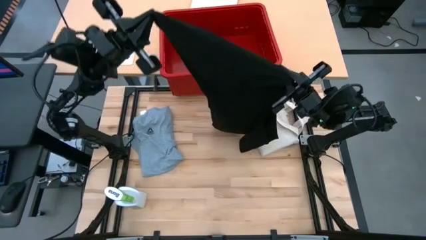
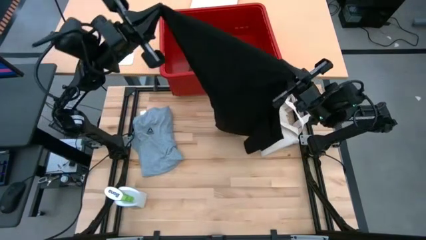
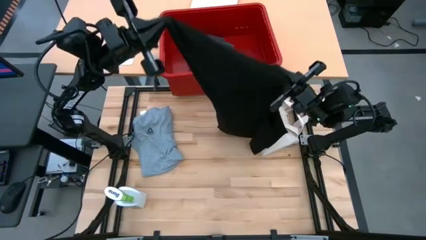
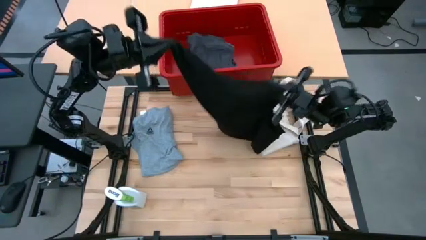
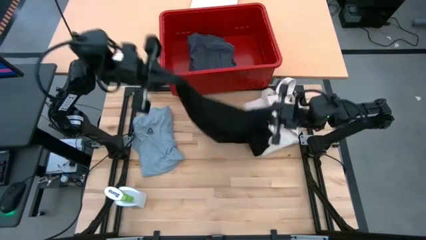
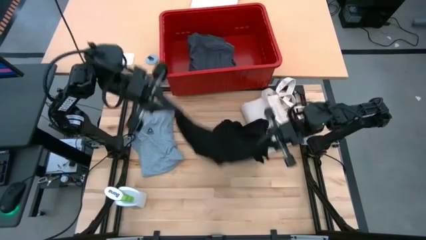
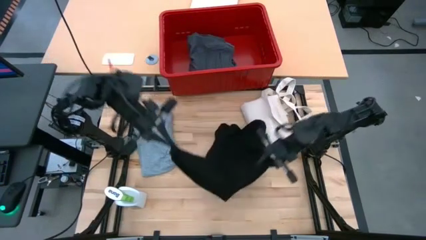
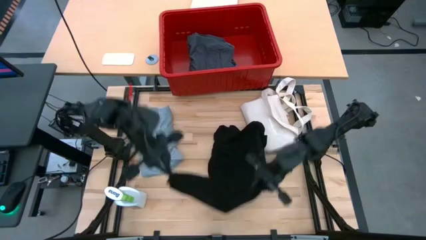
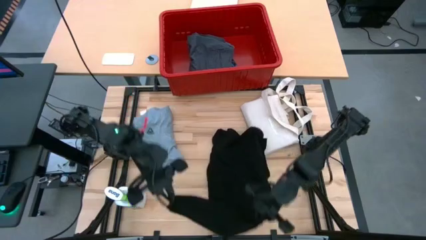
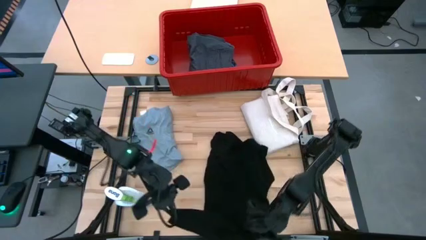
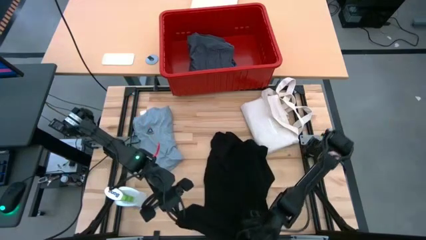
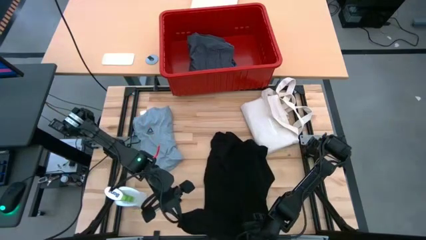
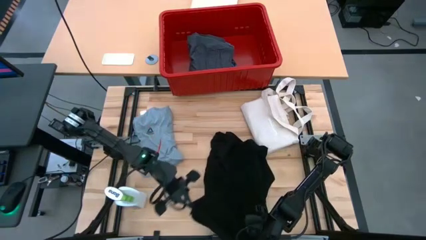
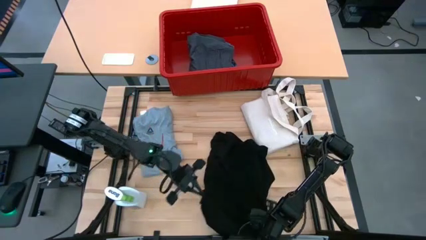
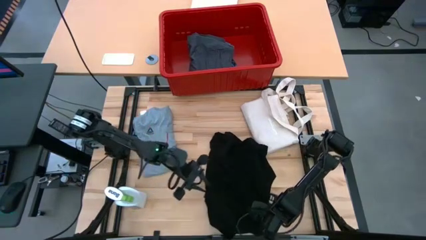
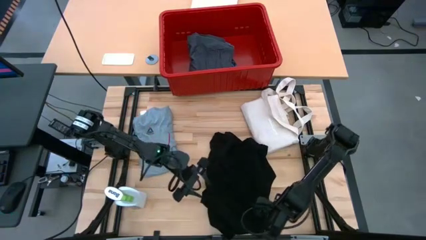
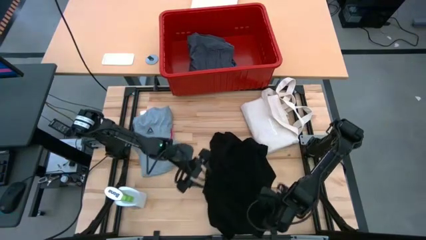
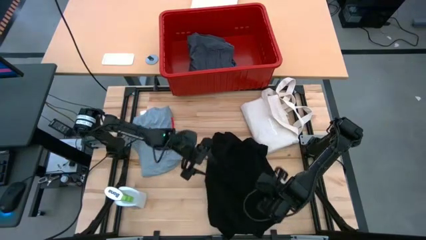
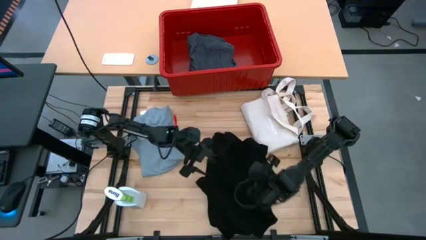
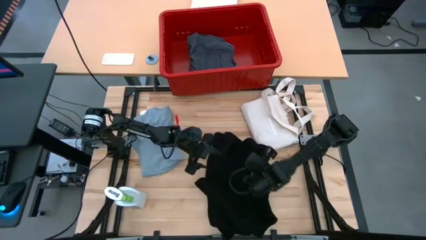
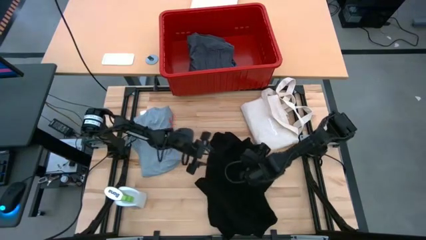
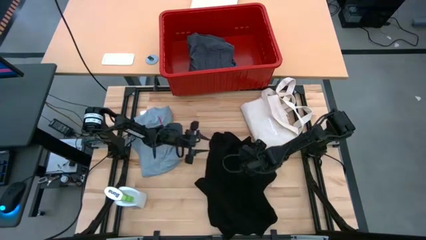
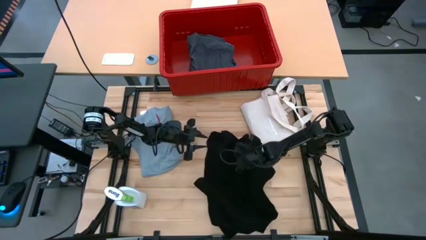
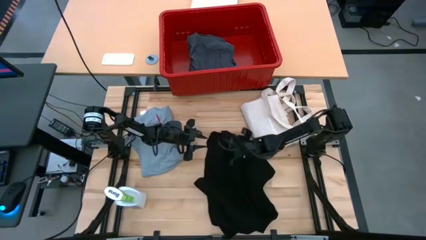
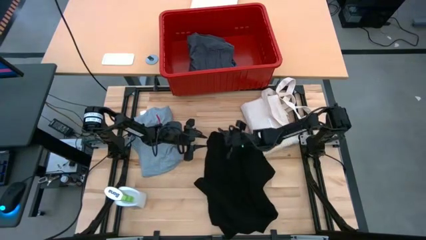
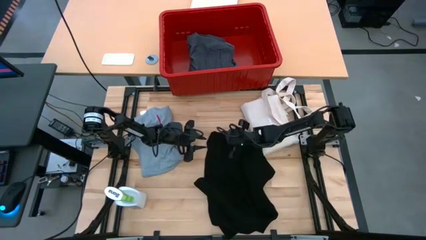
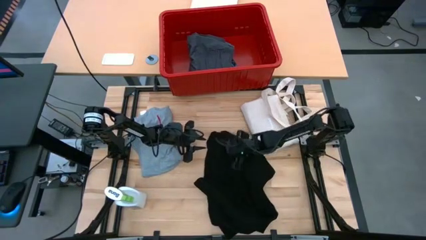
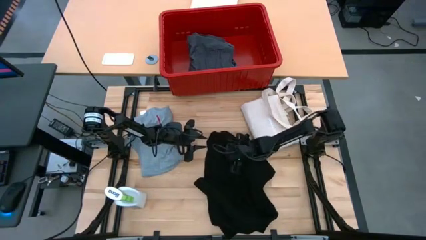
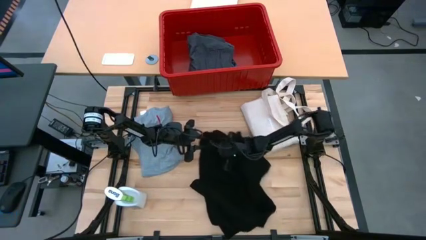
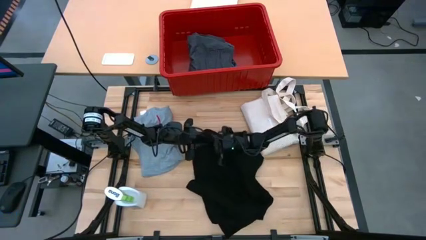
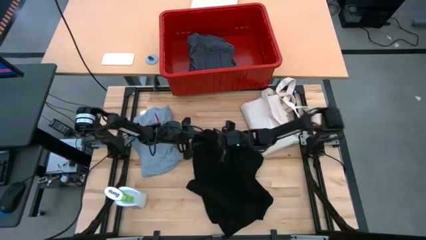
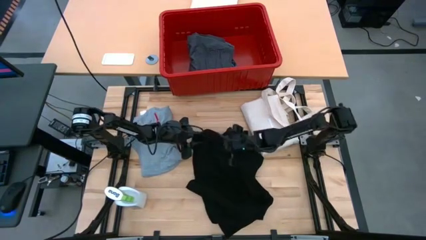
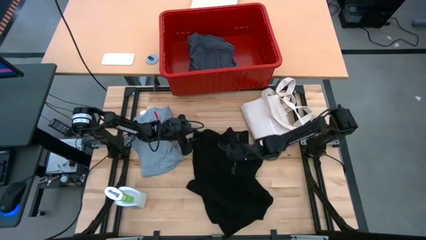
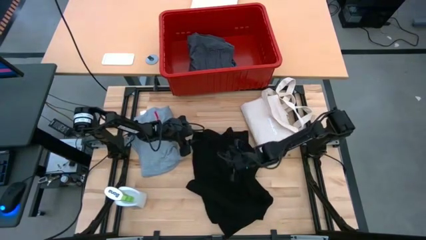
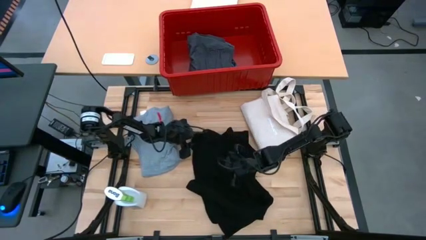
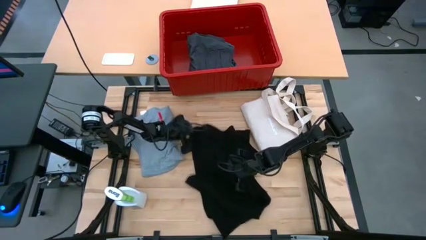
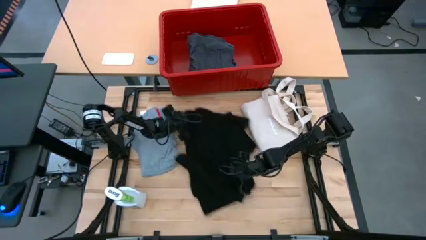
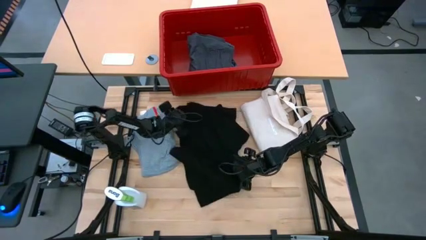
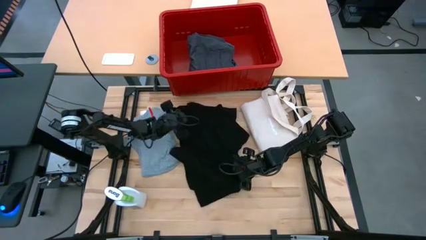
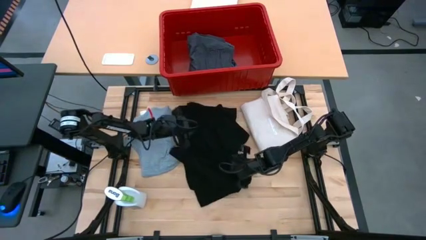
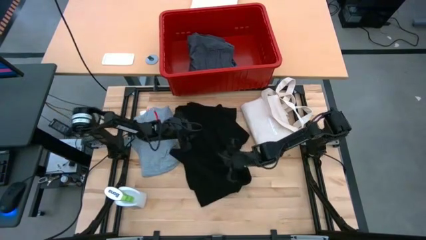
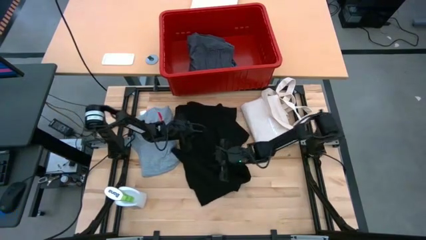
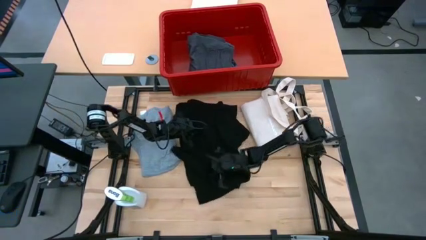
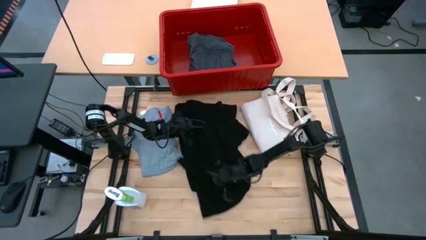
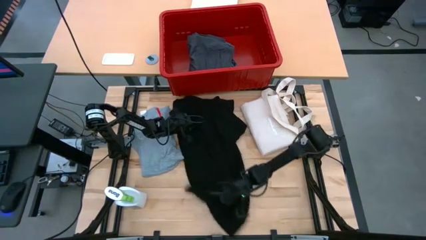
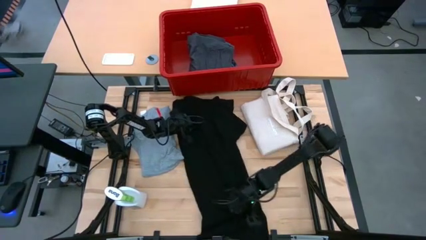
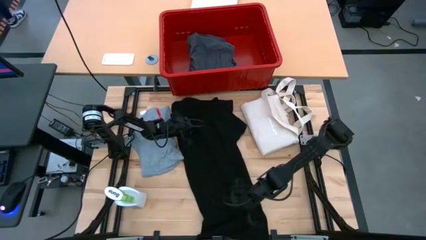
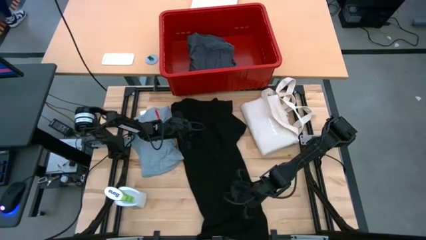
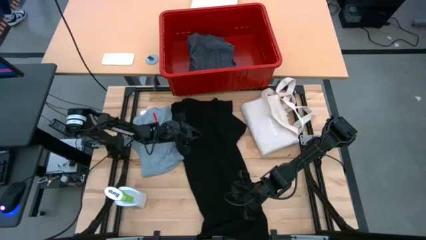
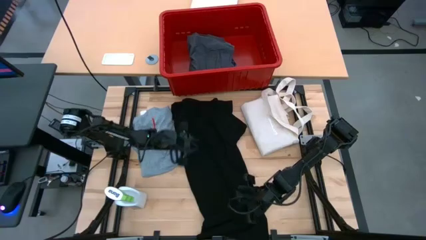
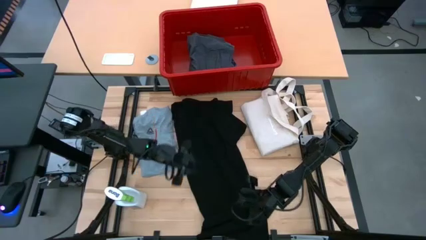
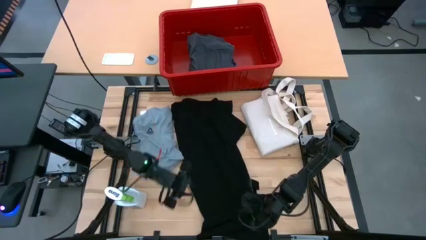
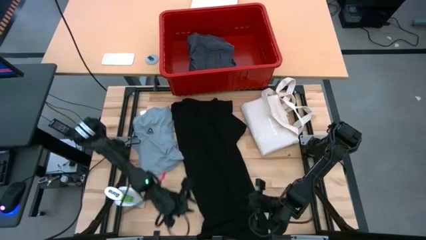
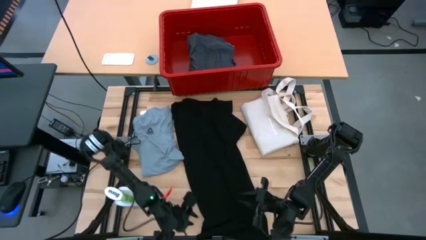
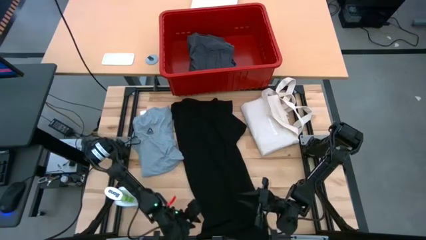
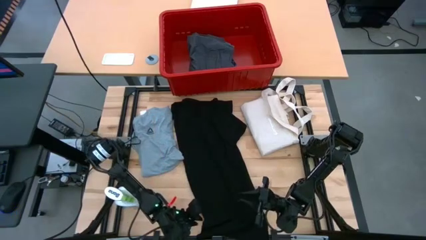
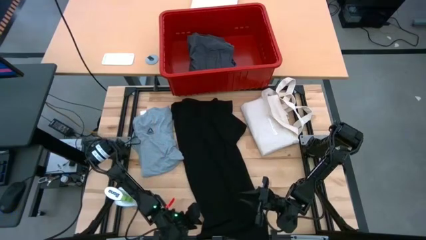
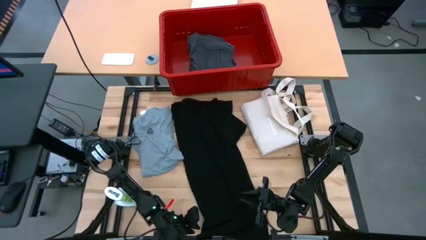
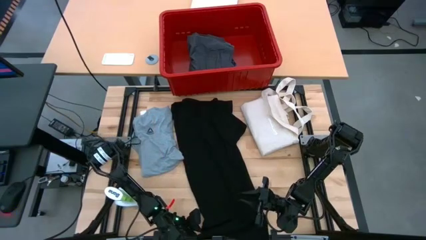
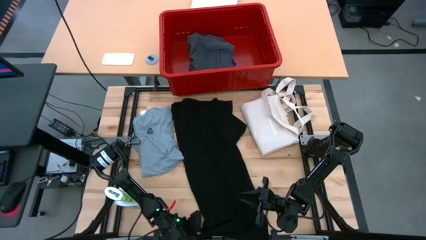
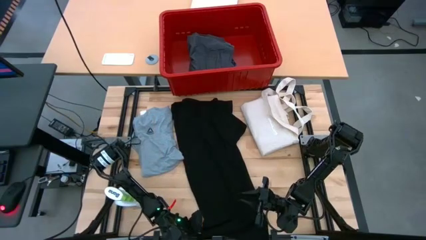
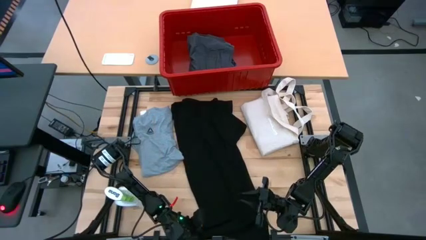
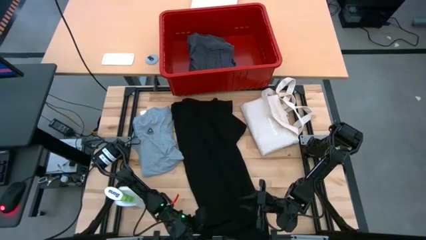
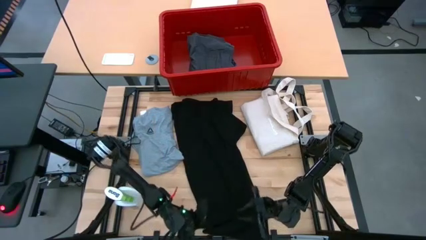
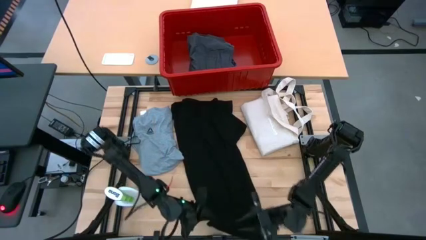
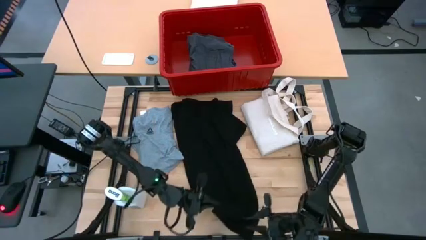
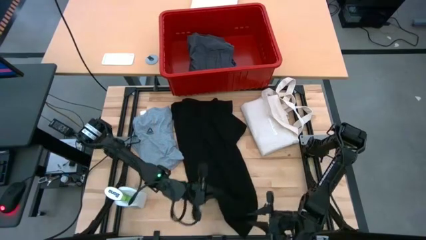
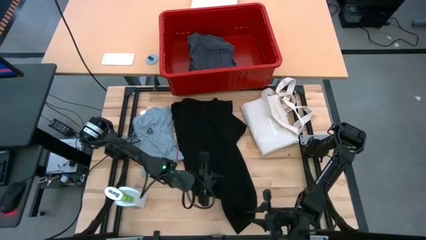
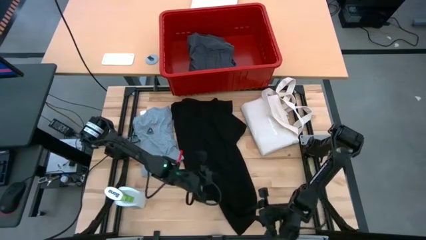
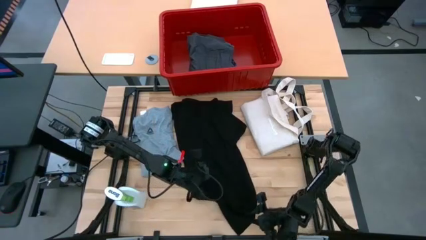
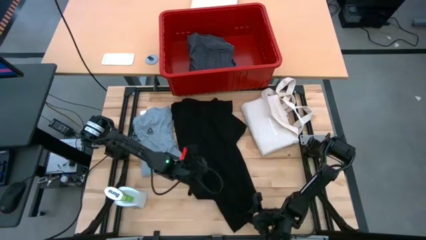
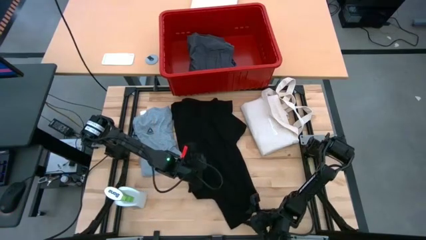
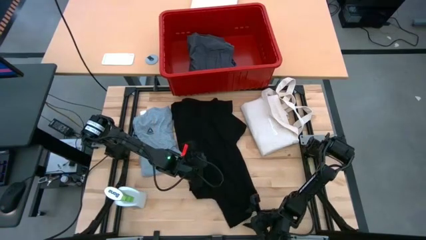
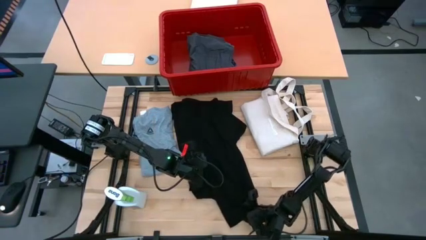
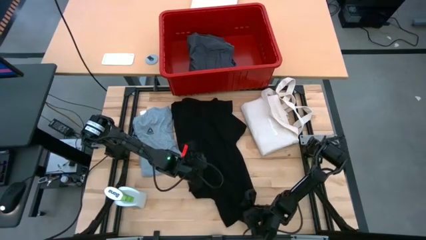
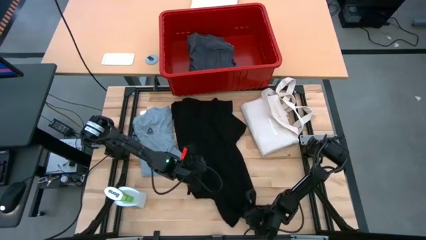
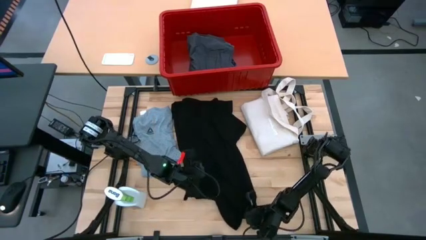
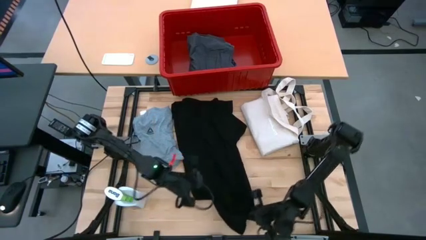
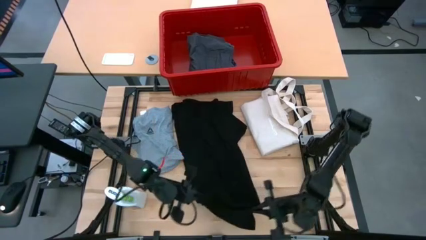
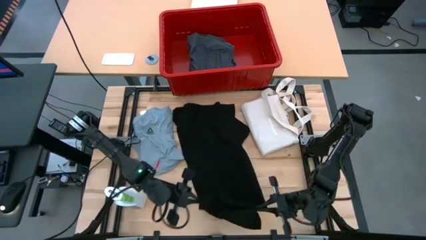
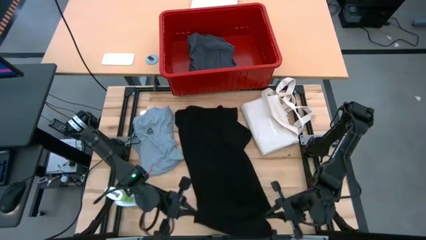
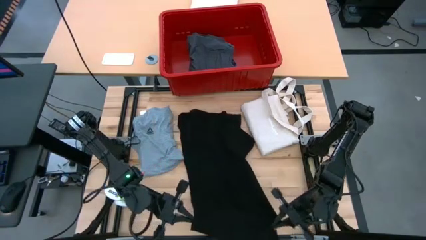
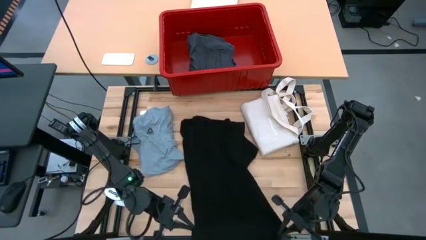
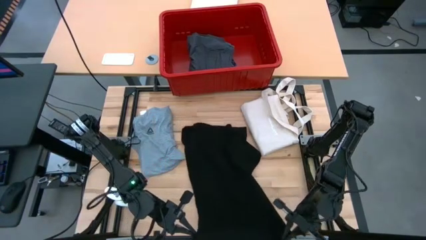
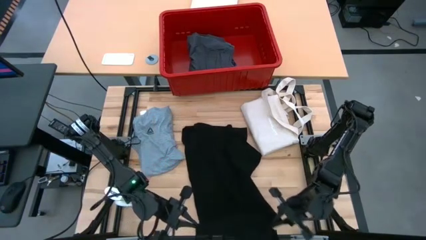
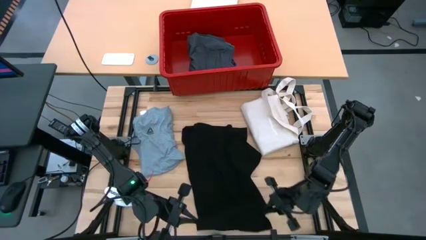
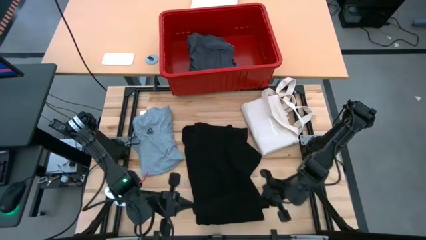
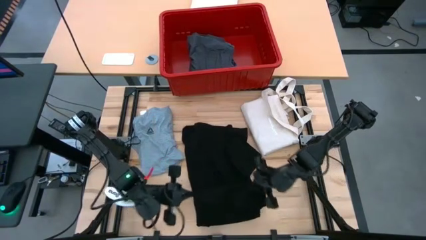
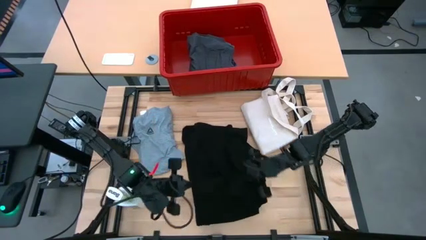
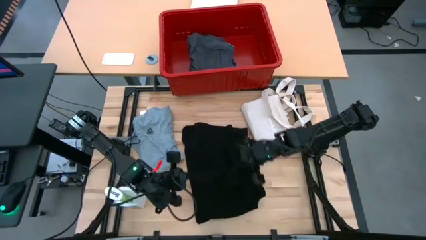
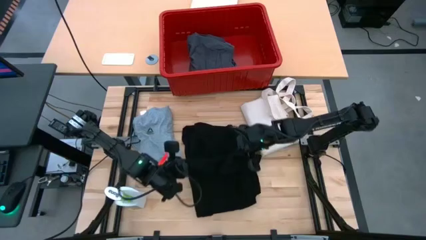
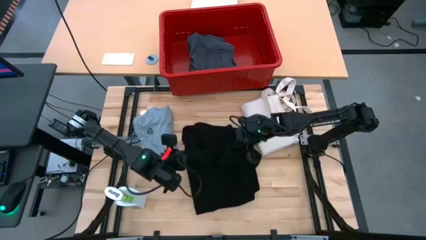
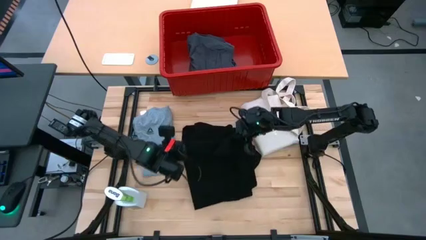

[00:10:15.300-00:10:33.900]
Task: Fold Laundry from Bin
Fold the black shirt
